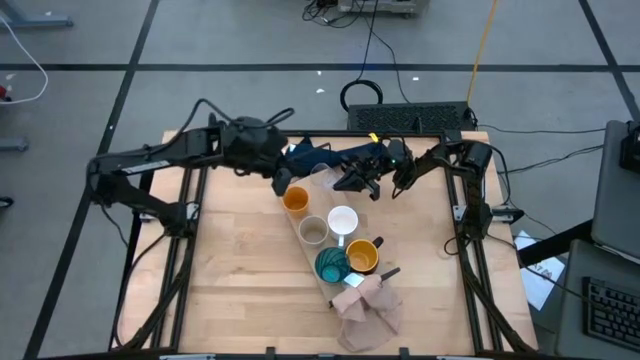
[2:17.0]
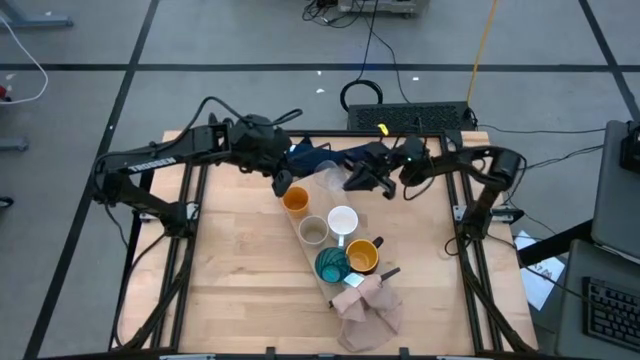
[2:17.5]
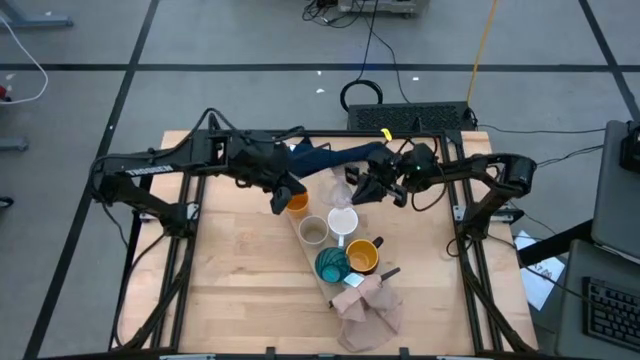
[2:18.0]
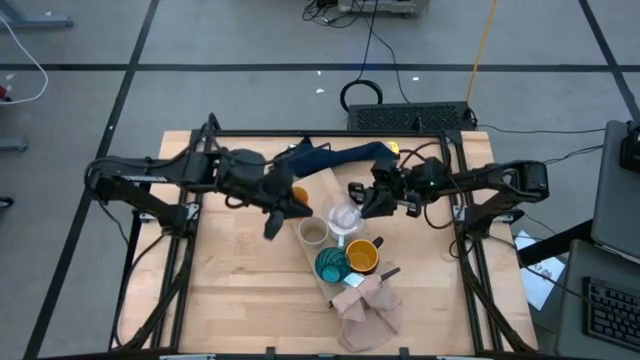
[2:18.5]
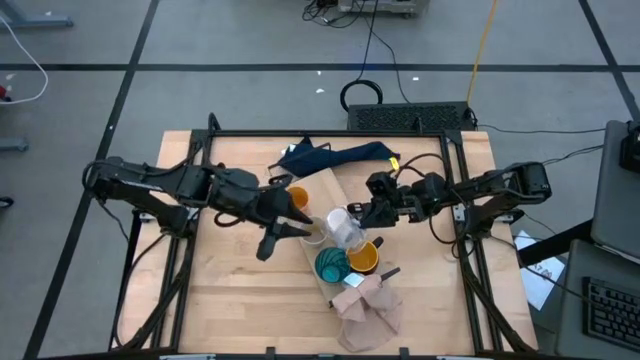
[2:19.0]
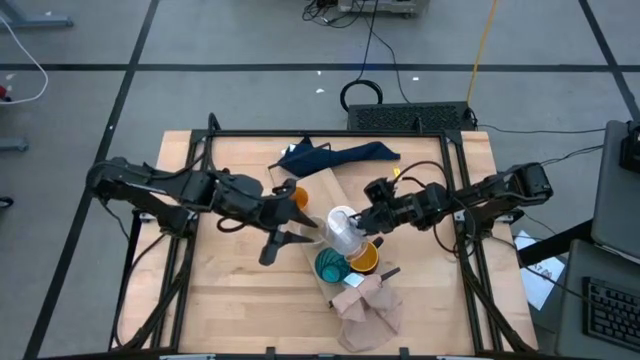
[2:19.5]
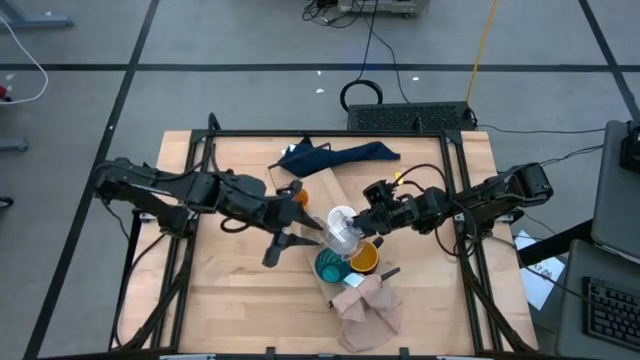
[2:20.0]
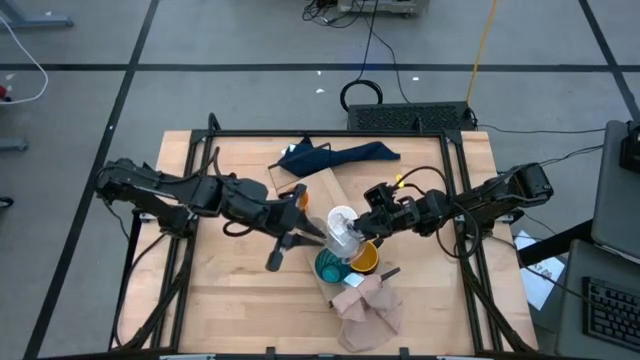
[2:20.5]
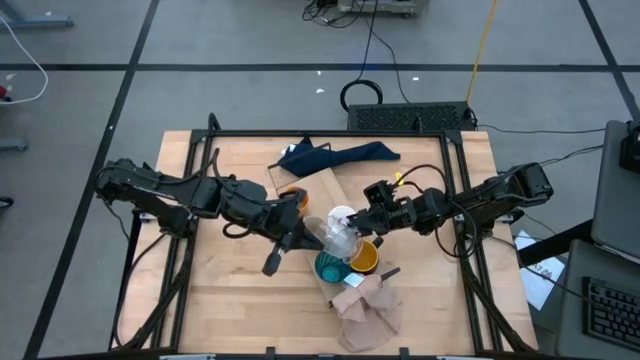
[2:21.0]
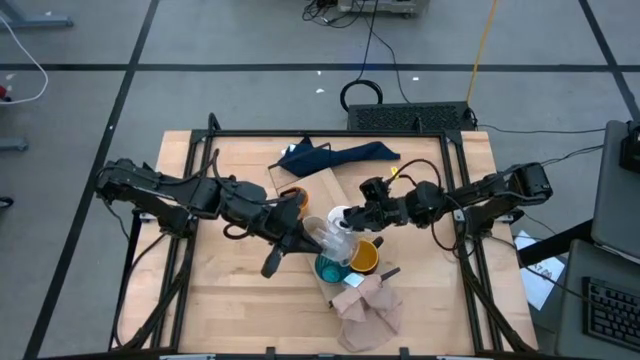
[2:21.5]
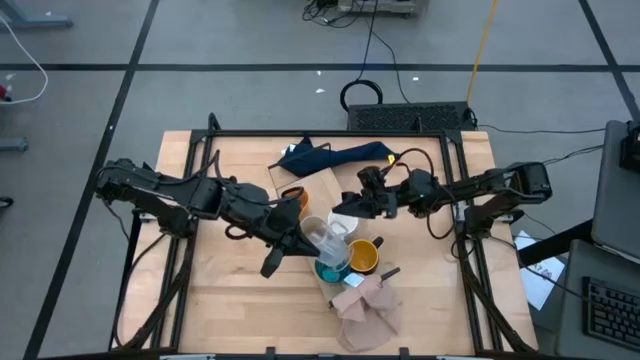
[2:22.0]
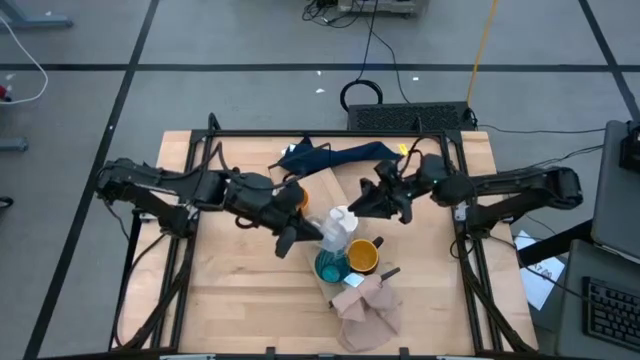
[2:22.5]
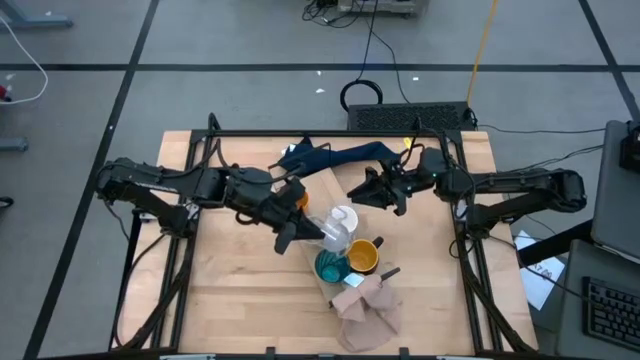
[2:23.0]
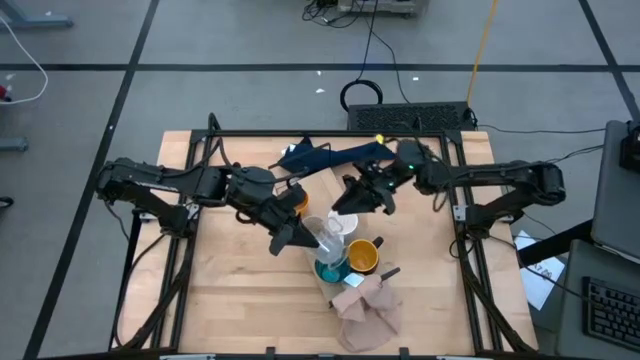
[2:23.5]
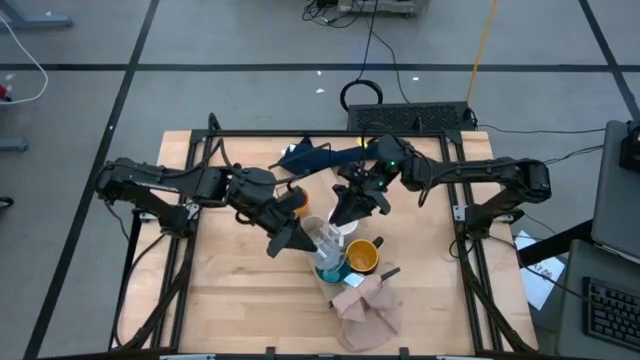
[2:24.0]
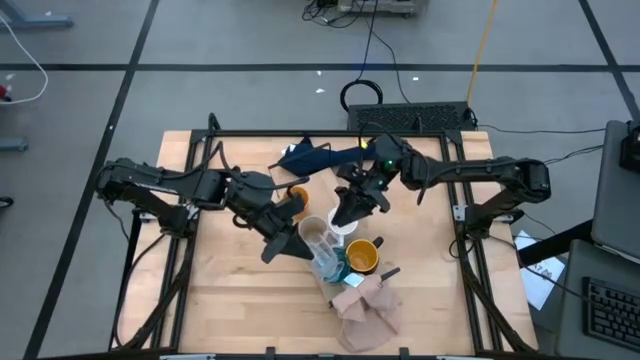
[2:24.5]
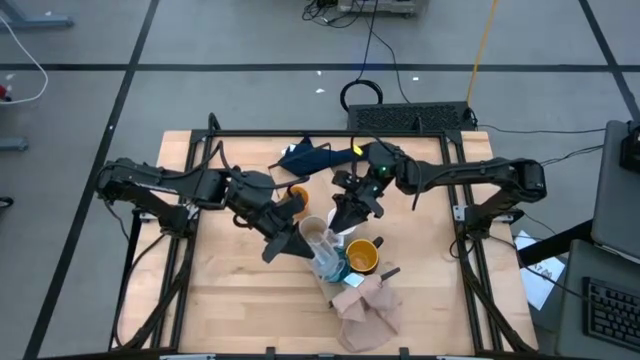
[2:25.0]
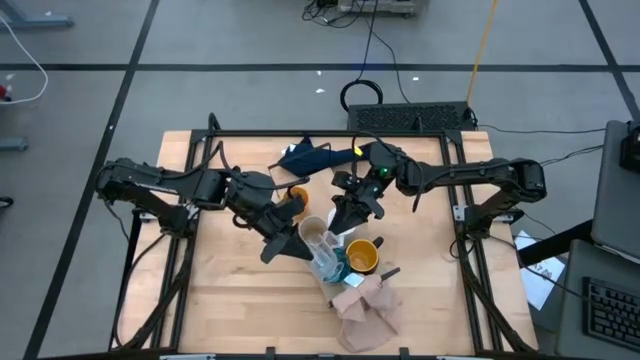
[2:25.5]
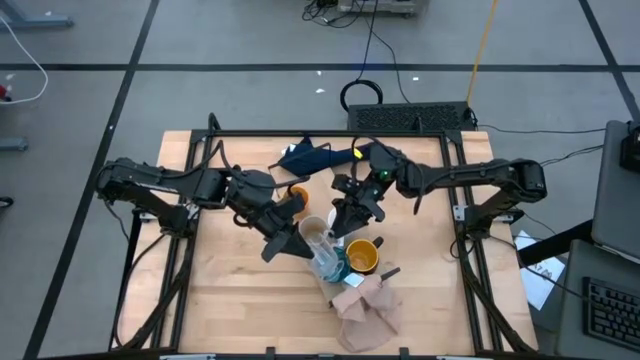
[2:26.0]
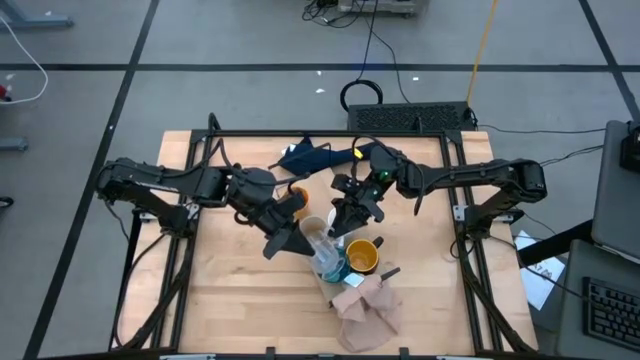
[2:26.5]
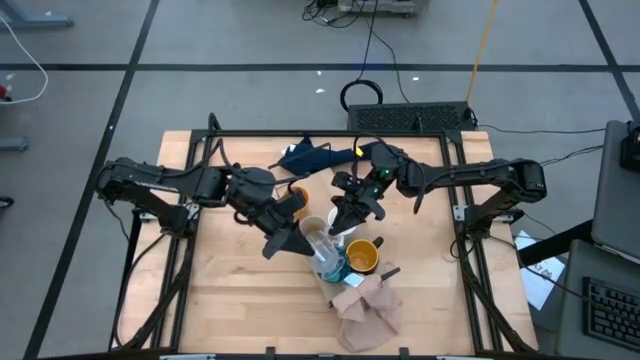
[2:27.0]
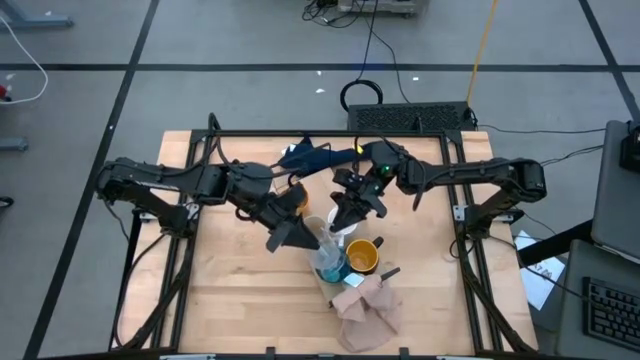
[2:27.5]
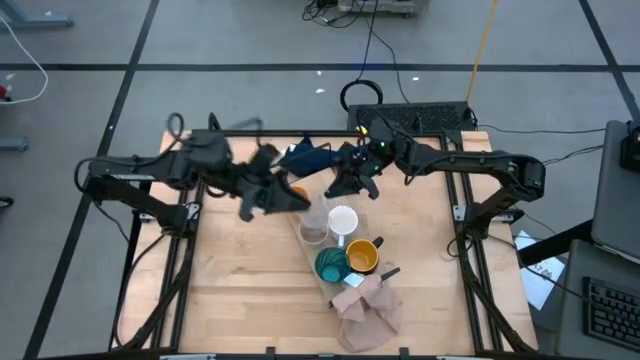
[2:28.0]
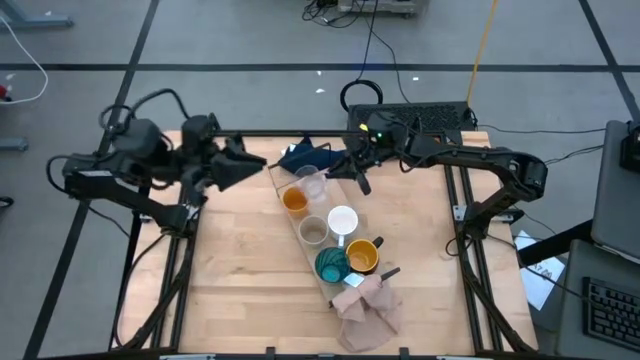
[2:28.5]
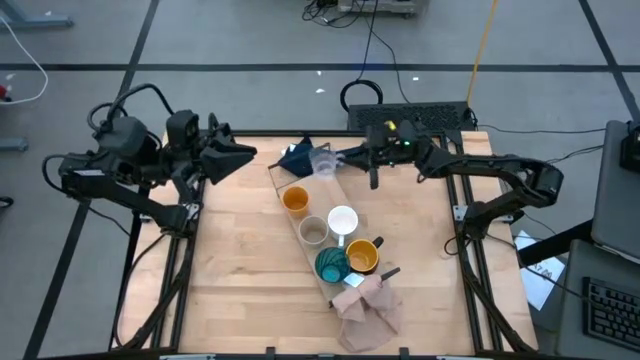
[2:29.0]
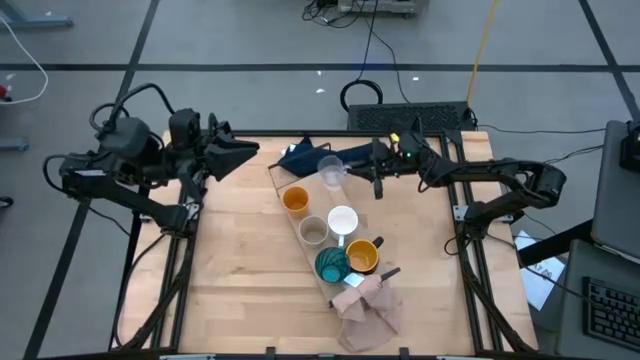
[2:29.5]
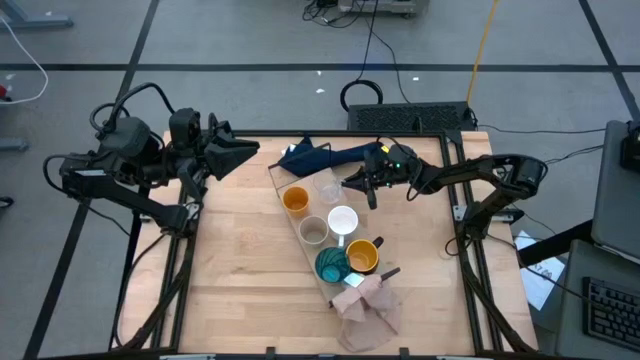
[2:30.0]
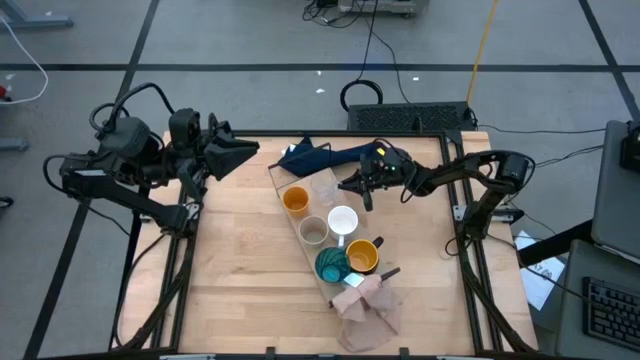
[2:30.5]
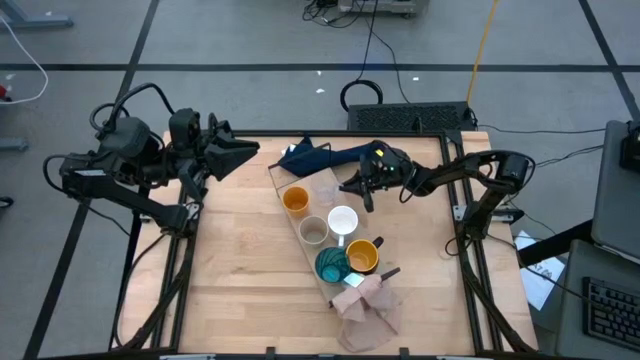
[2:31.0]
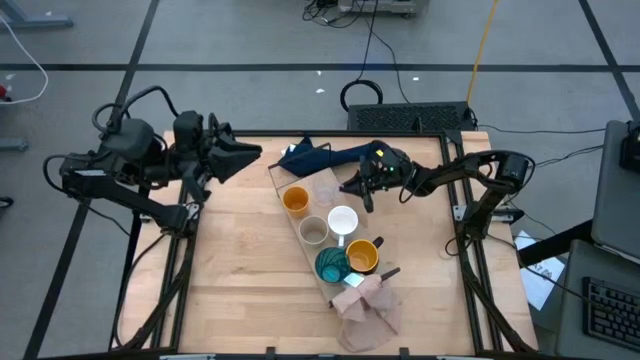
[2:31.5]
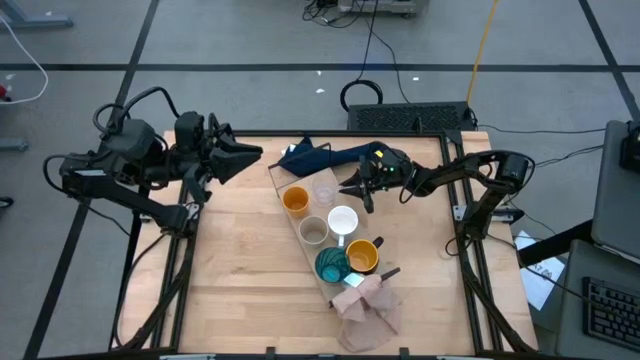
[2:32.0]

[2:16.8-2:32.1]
Task: Stack small to large cups/mugs on shelf
Put the transparent mug on the shelf
